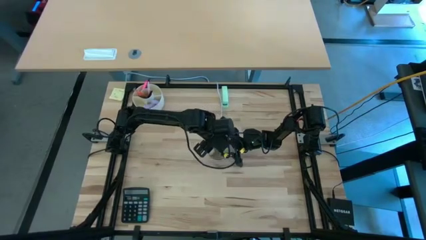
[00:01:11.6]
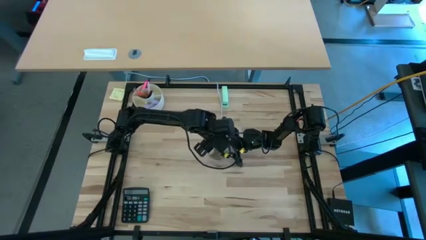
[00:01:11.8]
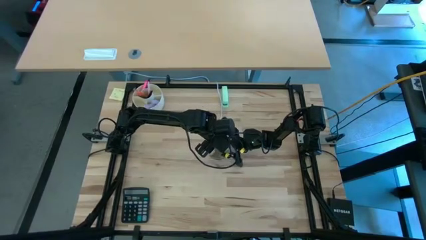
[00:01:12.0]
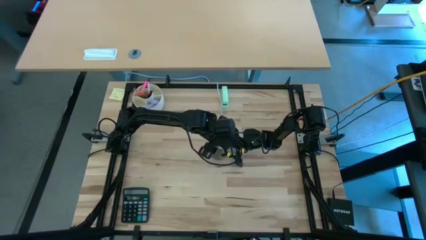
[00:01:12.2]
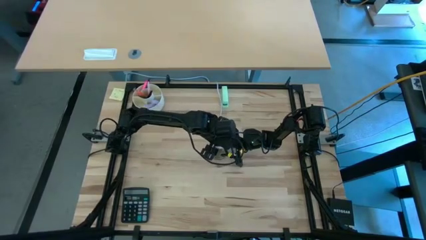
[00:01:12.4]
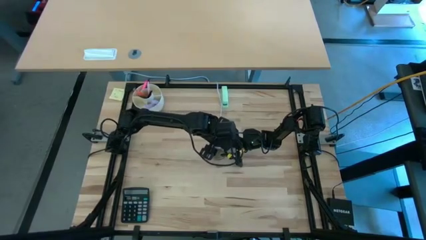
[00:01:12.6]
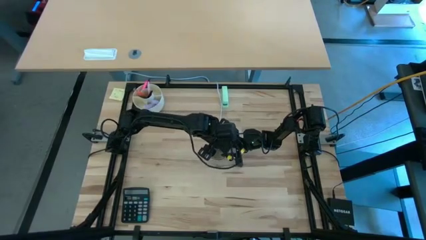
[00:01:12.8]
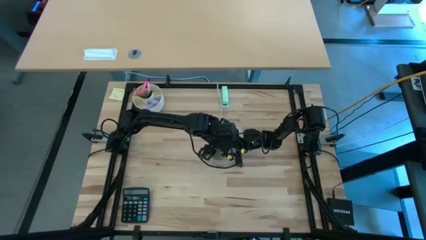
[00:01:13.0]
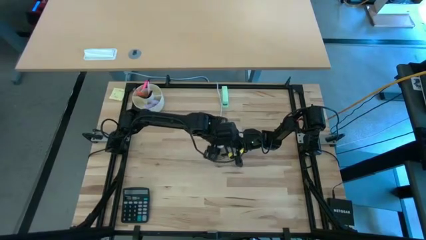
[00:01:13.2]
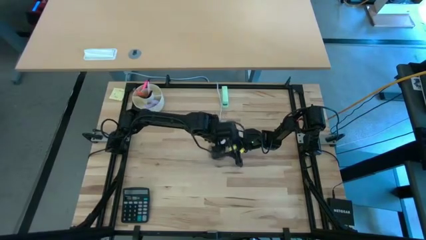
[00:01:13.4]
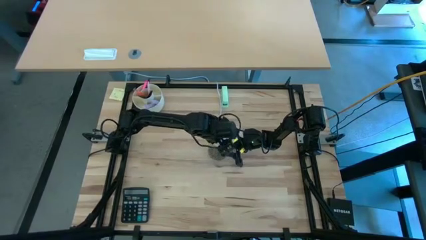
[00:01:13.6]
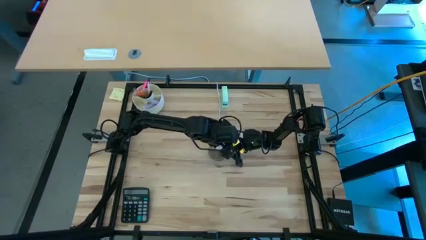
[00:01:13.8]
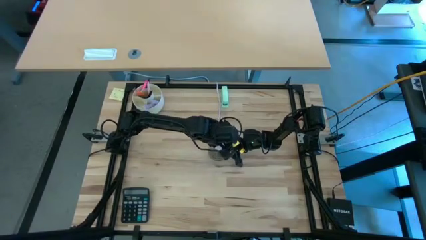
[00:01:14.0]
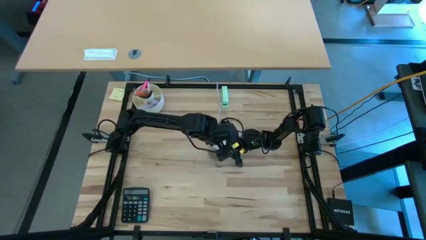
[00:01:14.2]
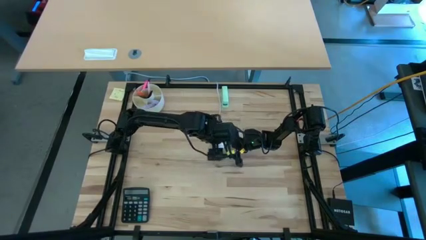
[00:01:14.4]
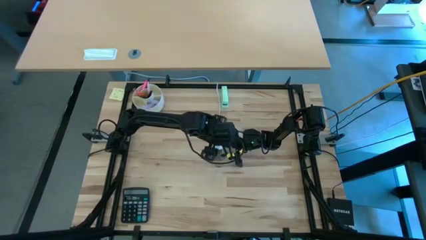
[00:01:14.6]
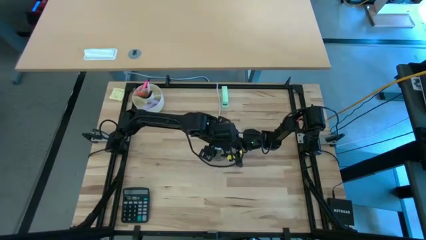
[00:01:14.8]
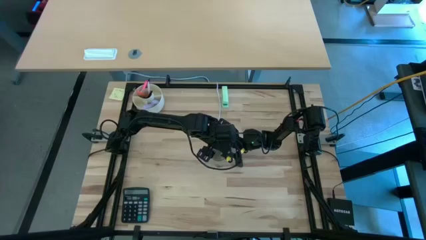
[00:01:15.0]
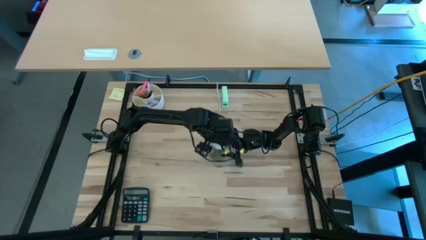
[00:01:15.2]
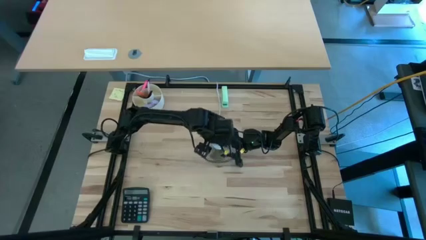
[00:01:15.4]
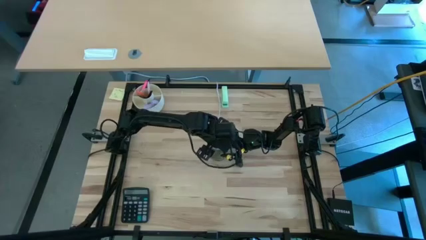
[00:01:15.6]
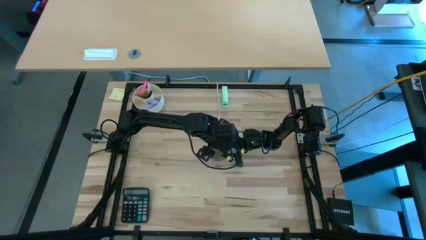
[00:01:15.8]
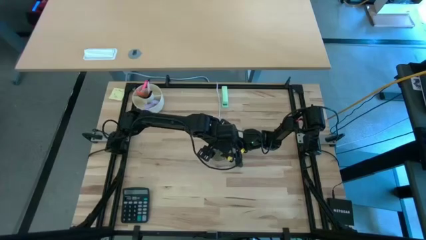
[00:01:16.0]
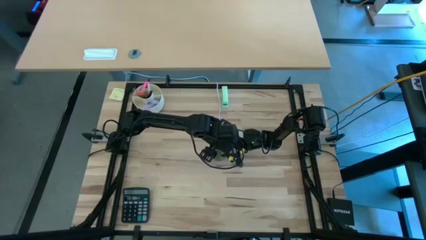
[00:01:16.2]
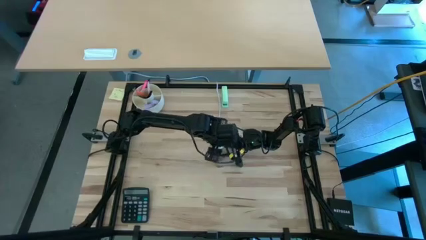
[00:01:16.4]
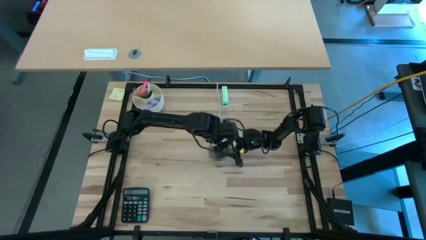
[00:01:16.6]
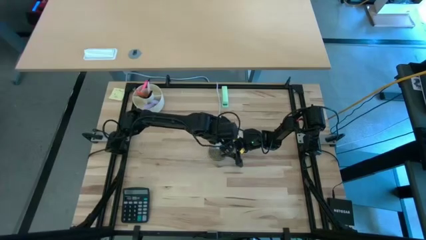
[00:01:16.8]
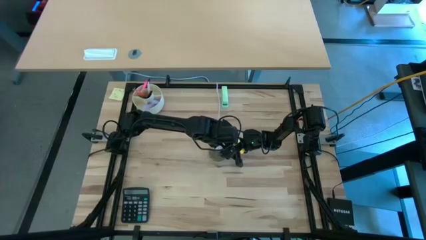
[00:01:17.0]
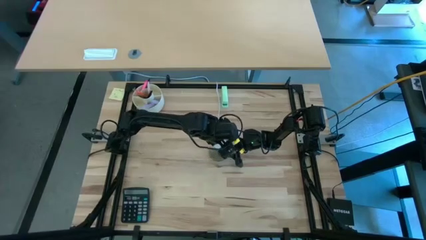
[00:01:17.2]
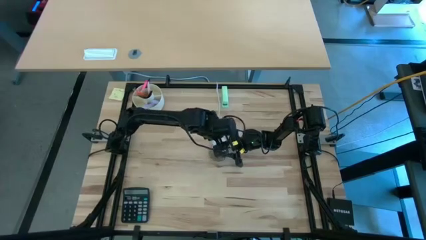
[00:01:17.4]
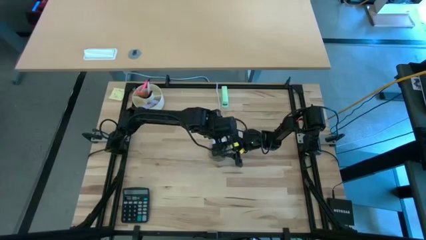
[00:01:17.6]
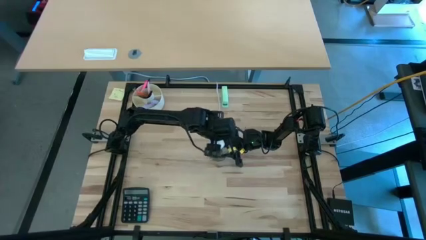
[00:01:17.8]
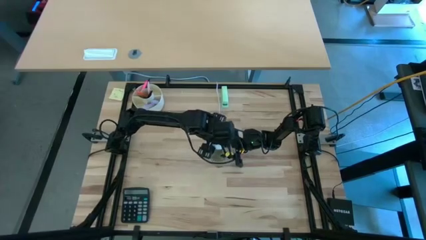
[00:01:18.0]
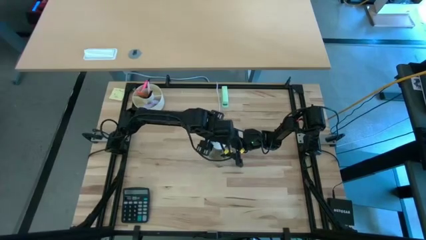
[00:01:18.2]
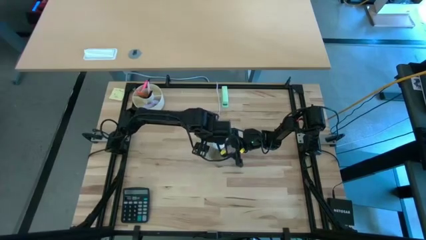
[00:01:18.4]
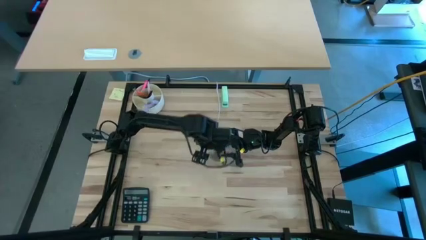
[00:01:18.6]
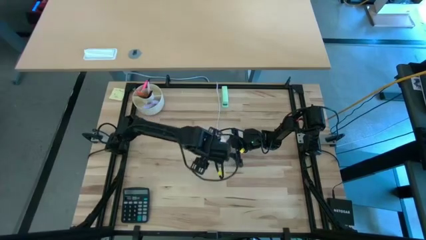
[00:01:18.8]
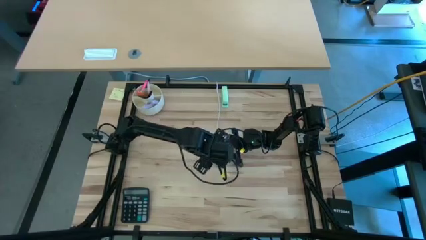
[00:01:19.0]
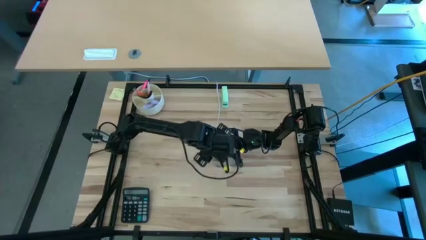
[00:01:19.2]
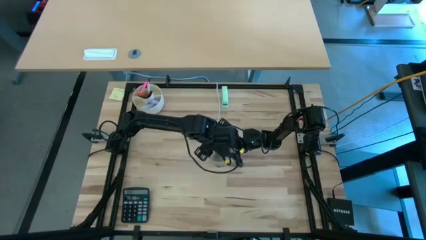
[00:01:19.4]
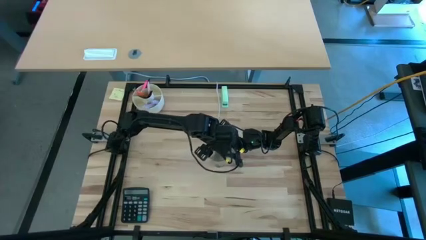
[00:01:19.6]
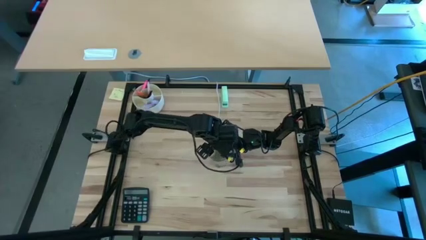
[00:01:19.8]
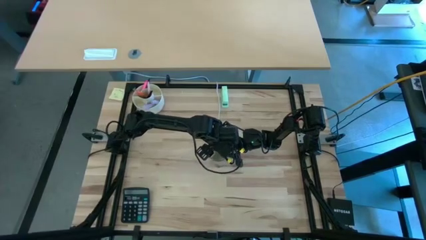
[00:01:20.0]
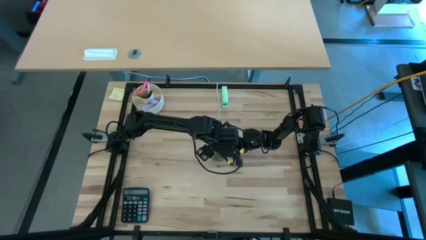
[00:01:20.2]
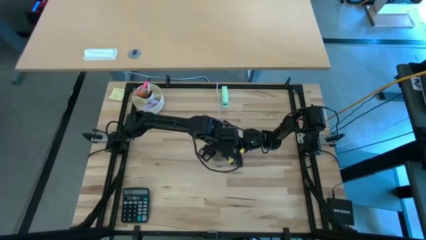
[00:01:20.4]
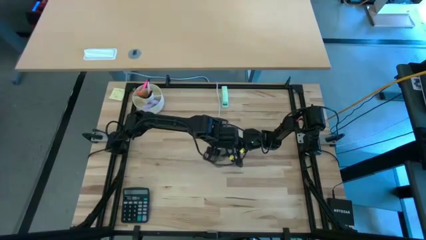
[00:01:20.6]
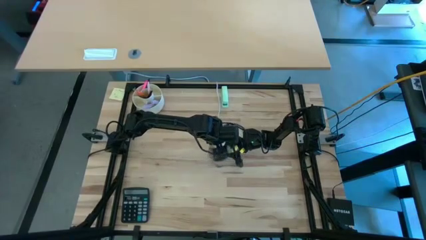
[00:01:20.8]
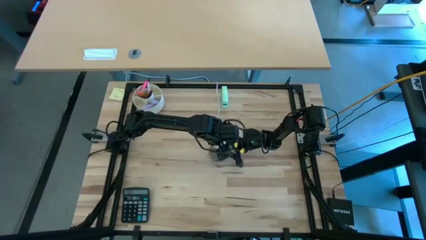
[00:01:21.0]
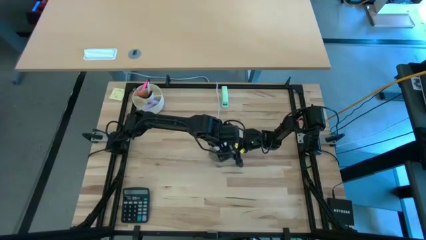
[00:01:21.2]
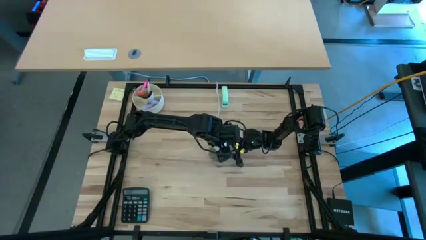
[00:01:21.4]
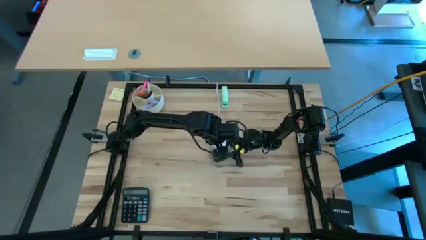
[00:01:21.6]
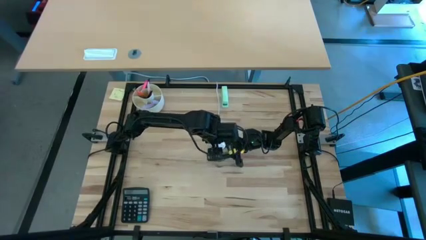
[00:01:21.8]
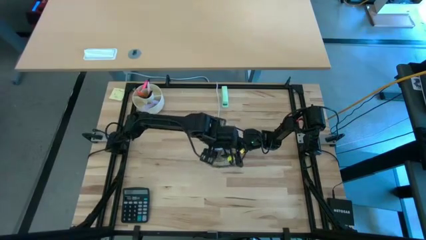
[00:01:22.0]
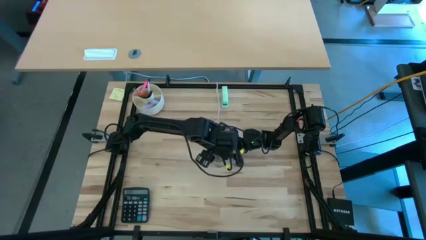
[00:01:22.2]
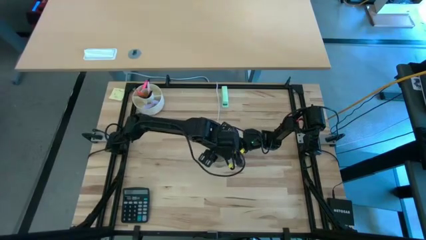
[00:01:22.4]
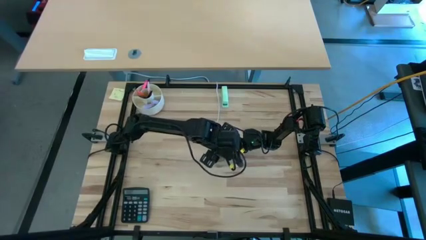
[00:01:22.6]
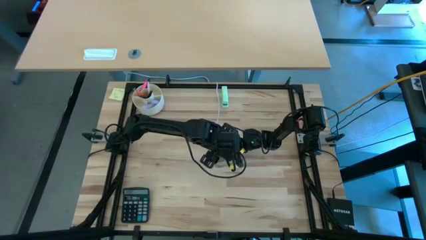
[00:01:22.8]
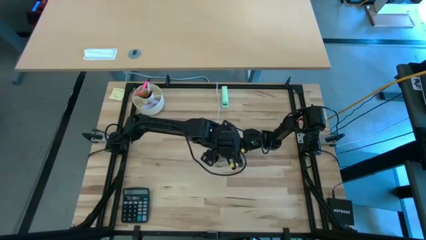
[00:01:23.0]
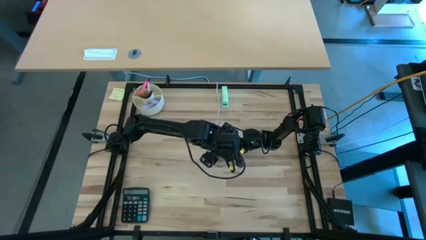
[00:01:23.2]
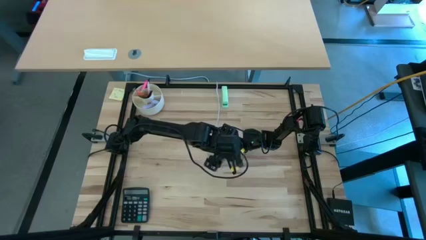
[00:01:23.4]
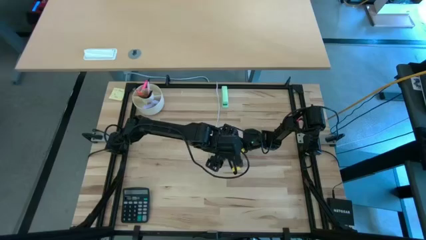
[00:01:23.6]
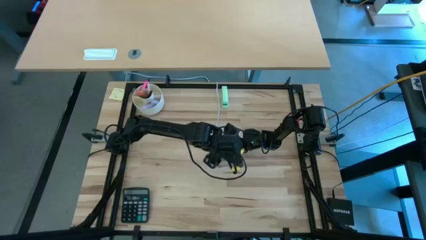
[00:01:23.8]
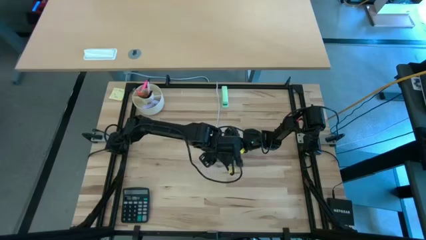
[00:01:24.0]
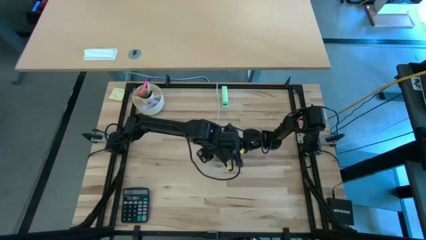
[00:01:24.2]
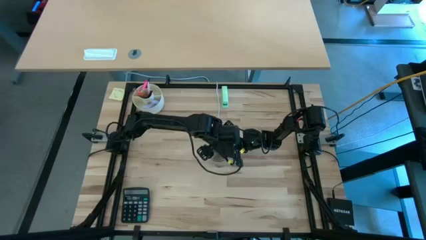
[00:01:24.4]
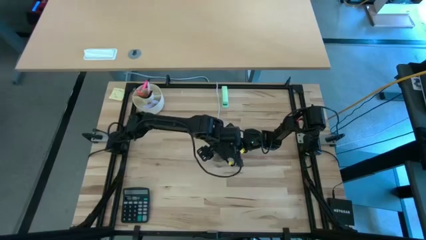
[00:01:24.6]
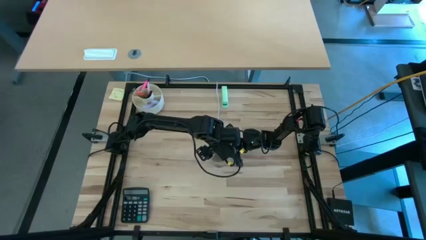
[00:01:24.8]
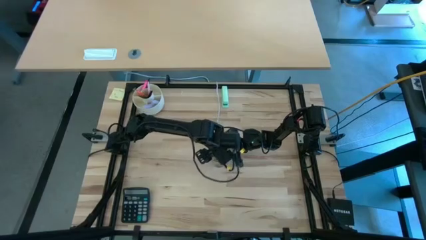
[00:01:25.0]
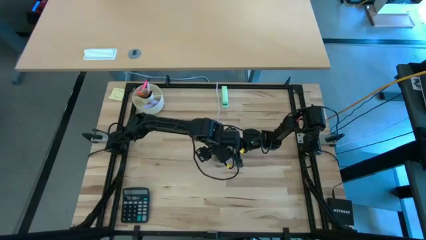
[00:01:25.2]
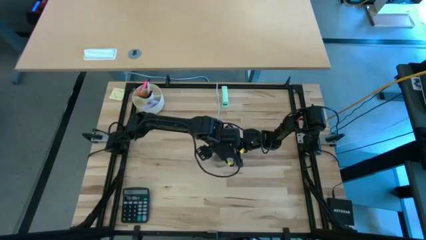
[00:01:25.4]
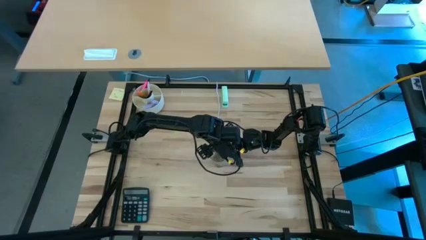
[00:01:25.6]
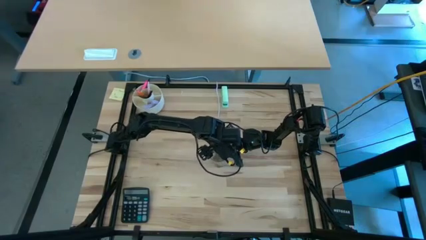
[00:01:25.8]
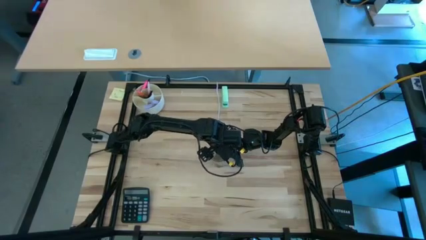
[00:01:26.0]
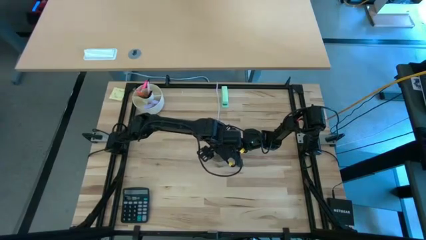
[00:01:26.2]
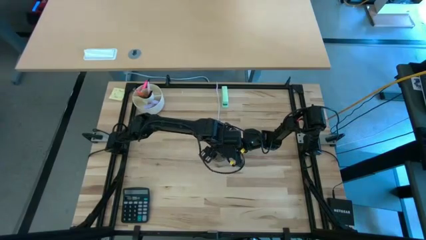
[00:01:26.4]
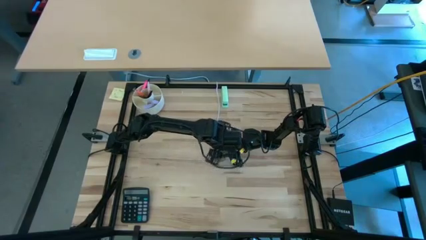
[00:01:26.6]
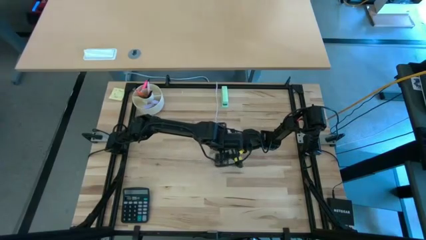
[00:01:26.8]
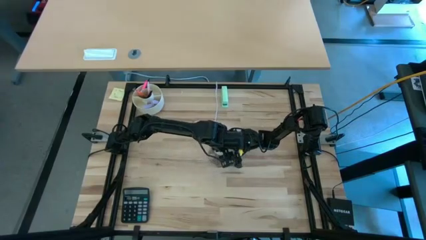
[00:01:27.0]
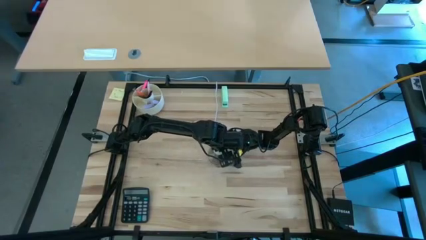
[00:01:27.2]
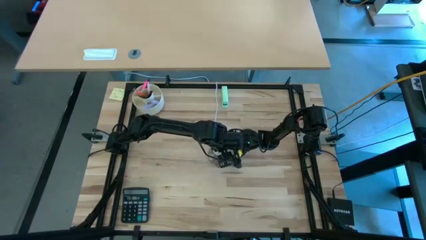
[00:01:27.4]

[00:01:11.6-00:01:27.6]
Task: Screw lightbulb
Remove the lightbulb from the lamp
